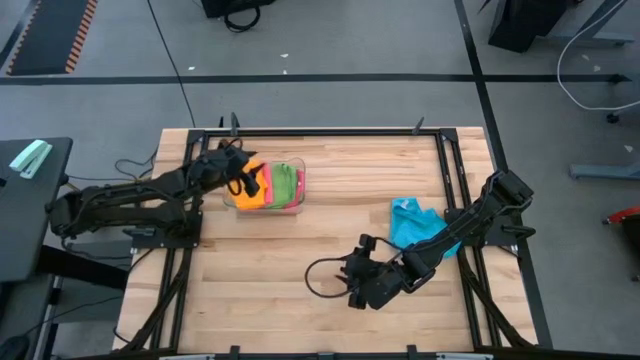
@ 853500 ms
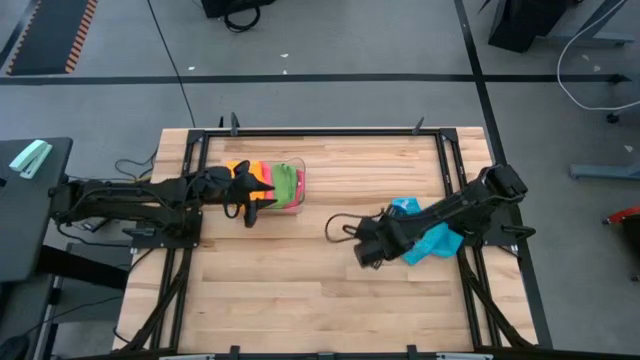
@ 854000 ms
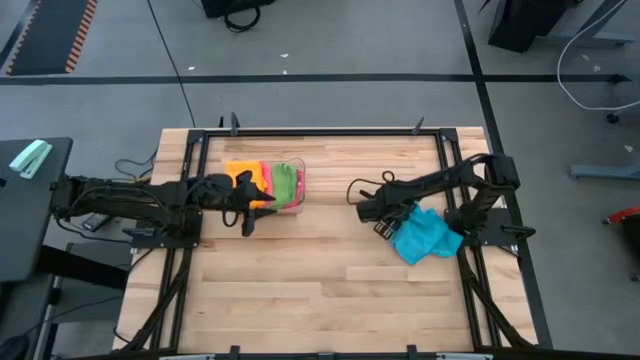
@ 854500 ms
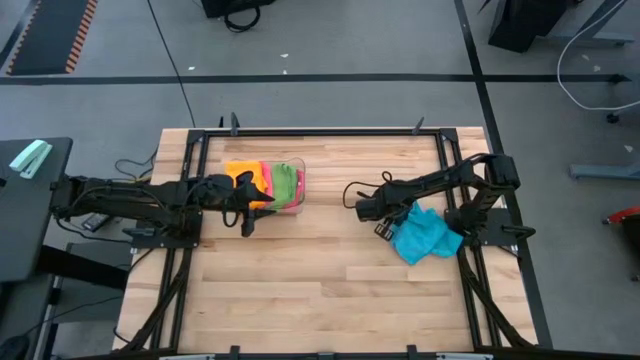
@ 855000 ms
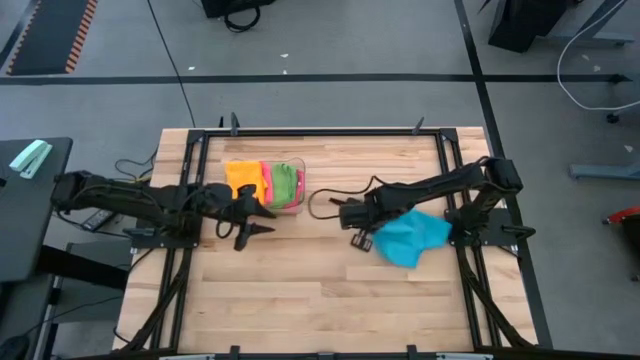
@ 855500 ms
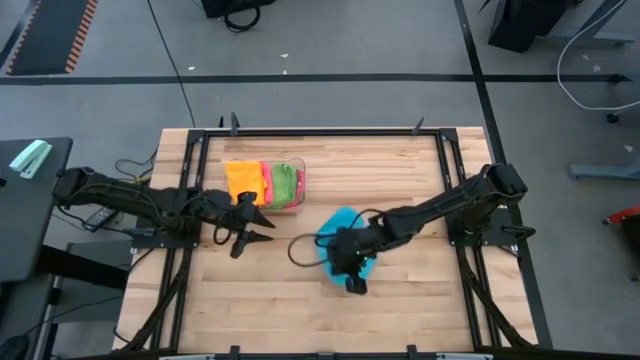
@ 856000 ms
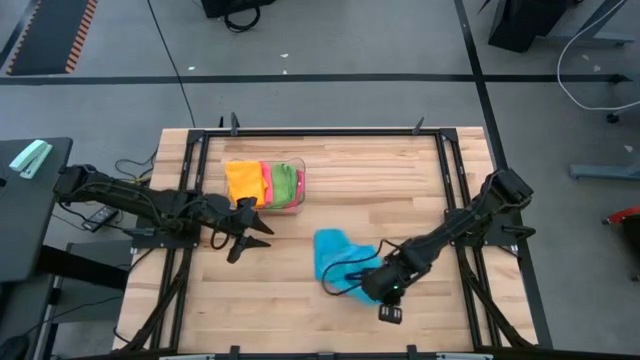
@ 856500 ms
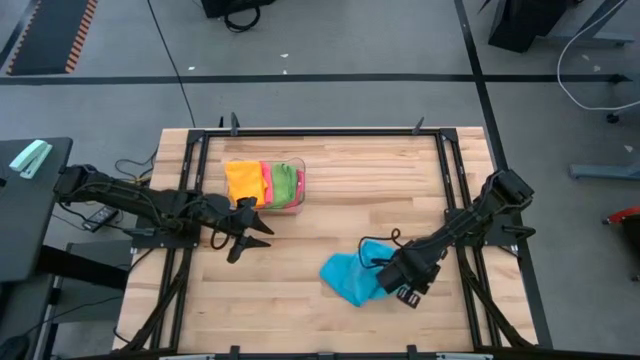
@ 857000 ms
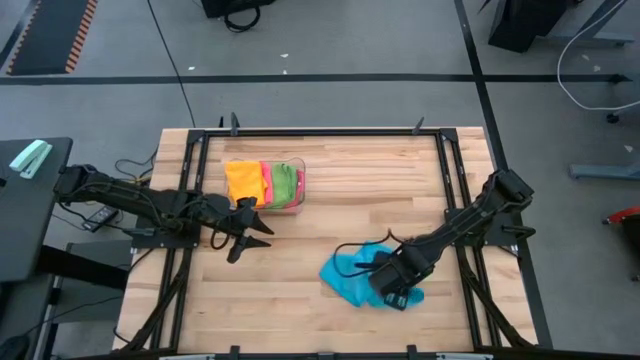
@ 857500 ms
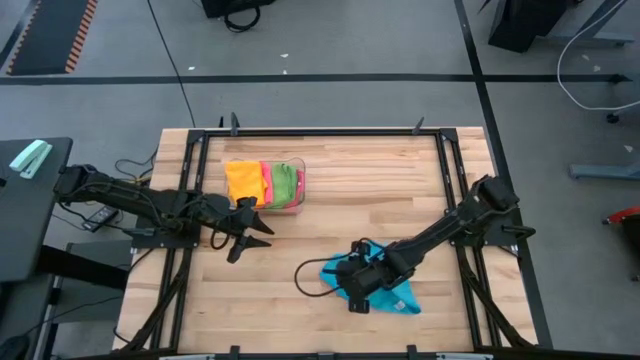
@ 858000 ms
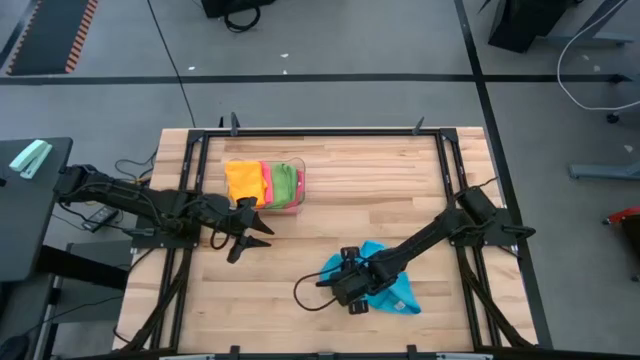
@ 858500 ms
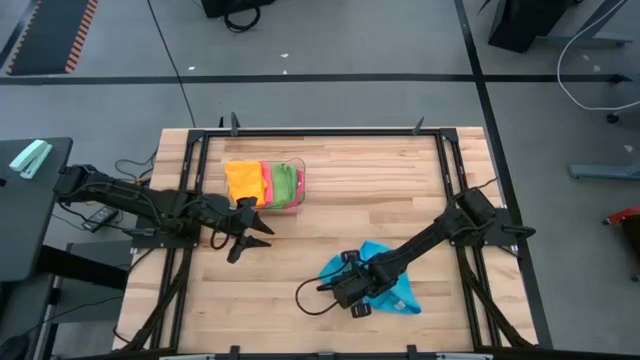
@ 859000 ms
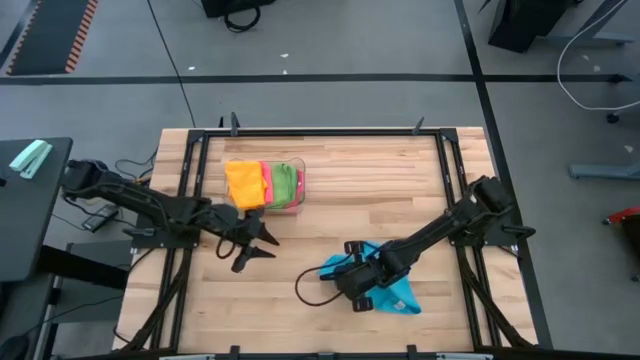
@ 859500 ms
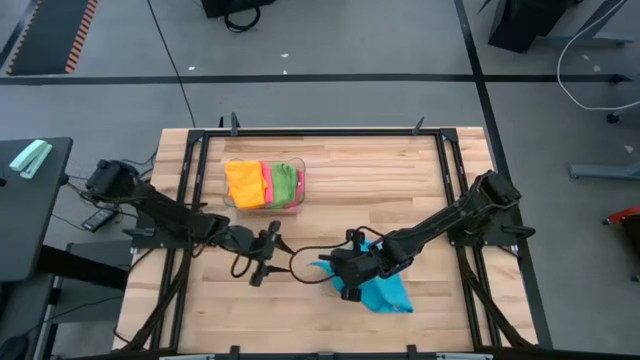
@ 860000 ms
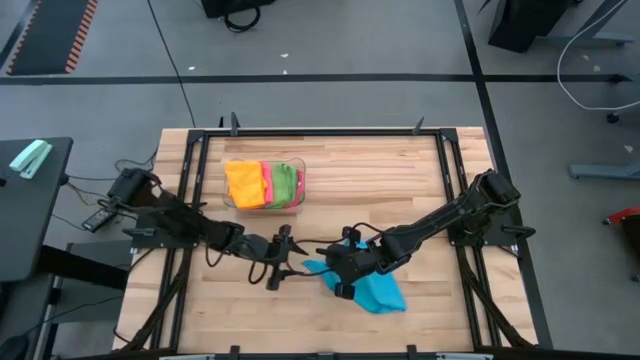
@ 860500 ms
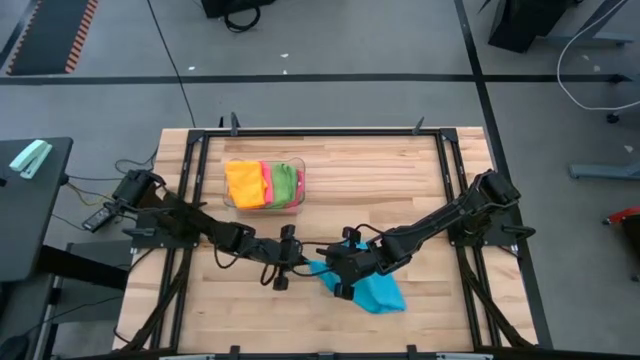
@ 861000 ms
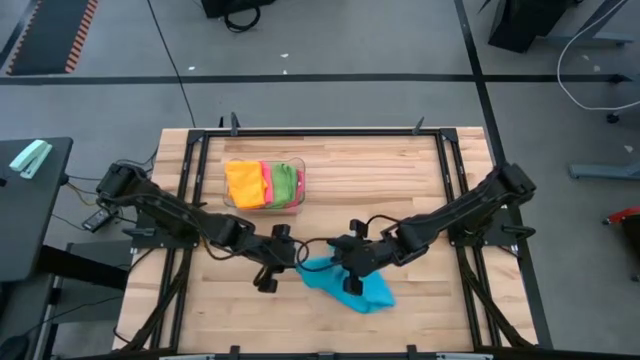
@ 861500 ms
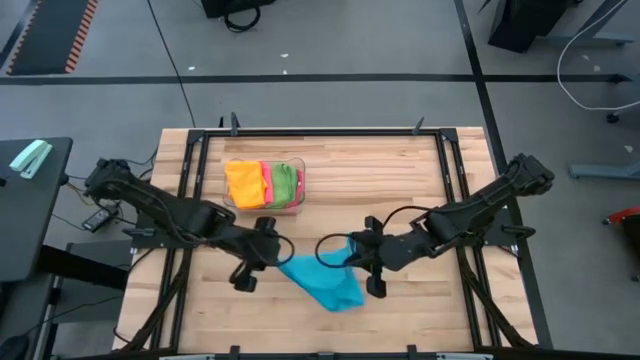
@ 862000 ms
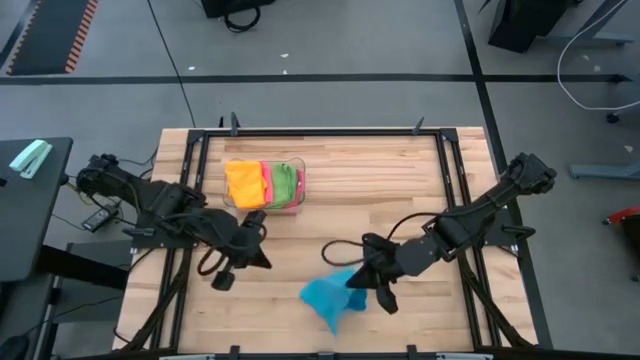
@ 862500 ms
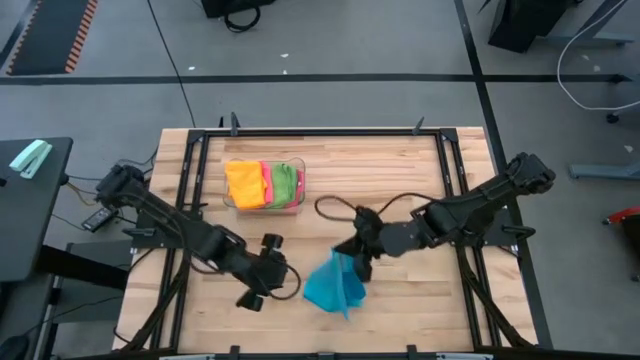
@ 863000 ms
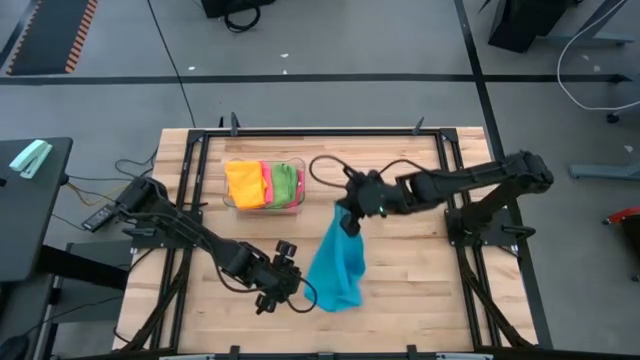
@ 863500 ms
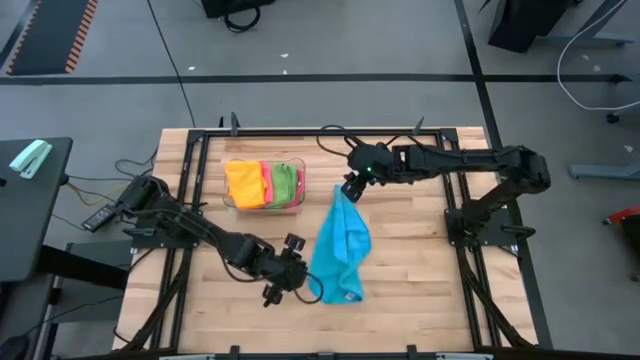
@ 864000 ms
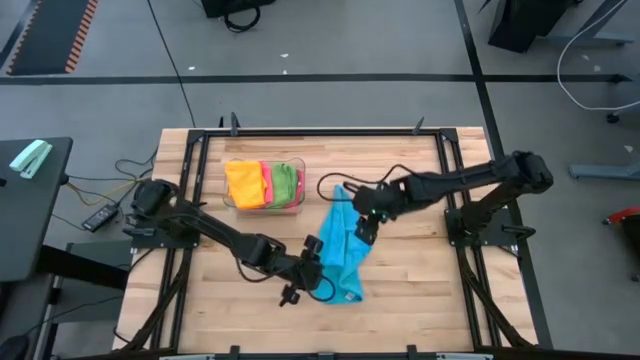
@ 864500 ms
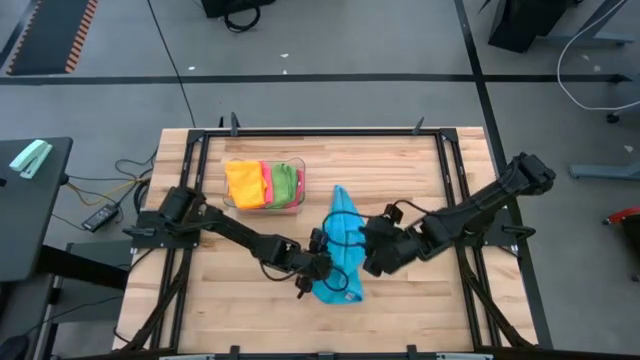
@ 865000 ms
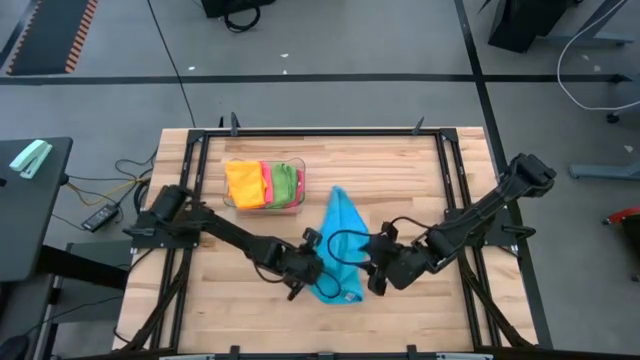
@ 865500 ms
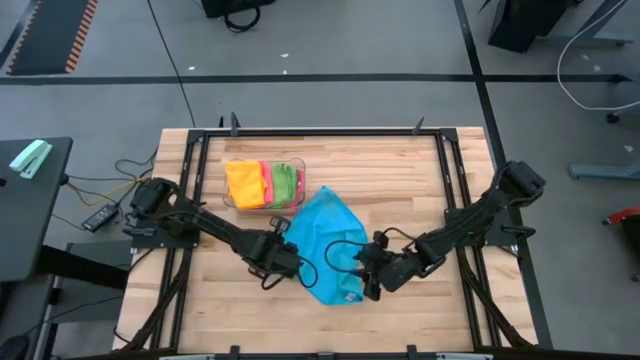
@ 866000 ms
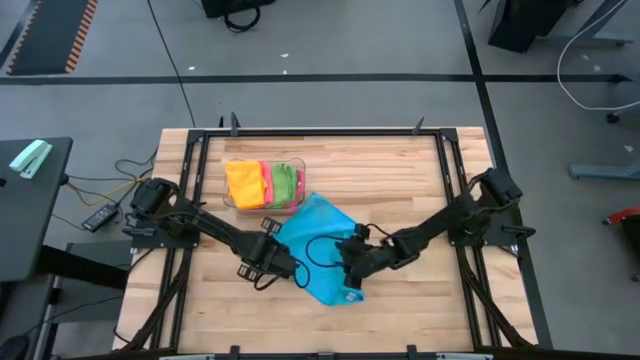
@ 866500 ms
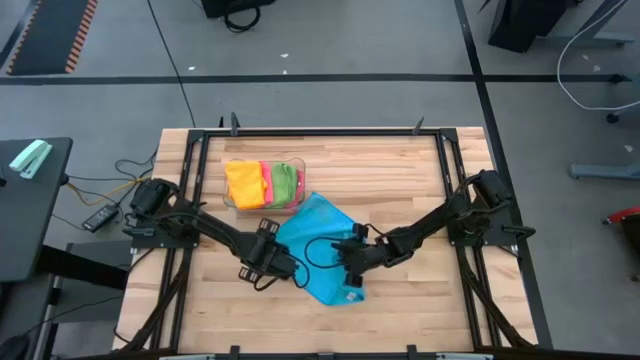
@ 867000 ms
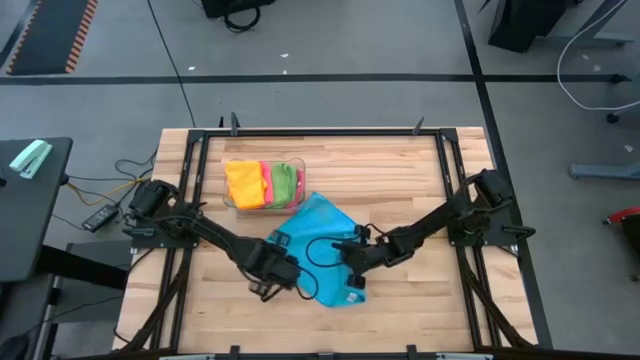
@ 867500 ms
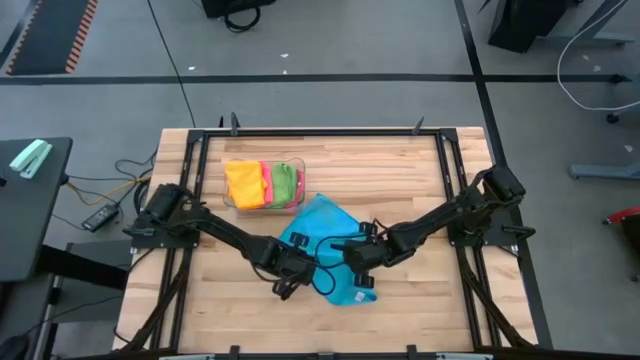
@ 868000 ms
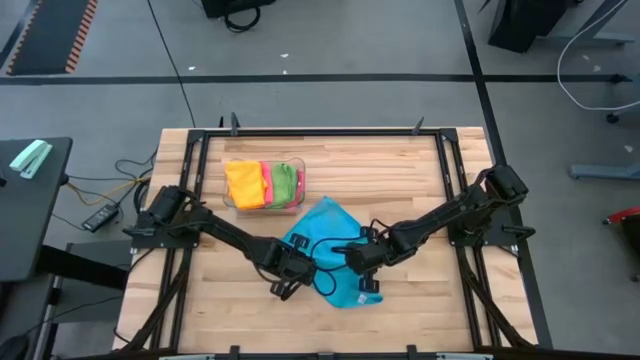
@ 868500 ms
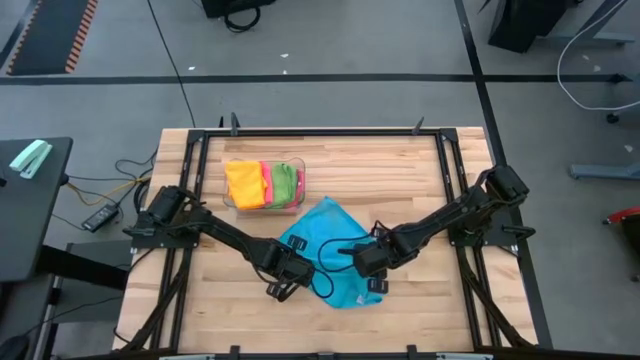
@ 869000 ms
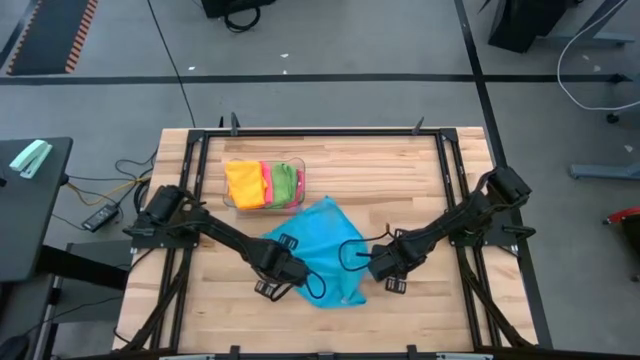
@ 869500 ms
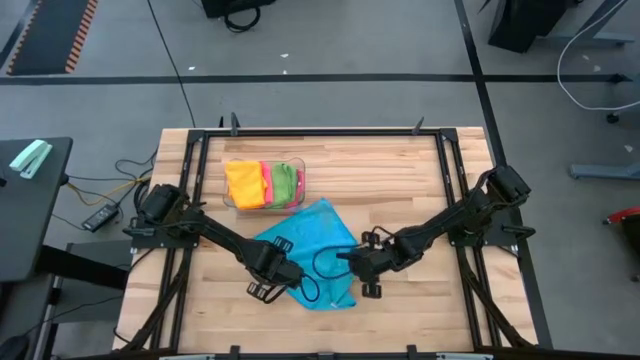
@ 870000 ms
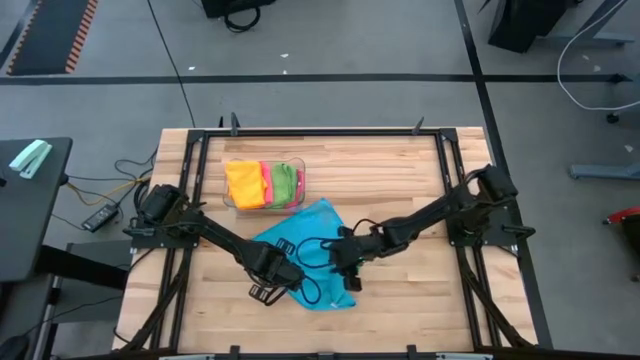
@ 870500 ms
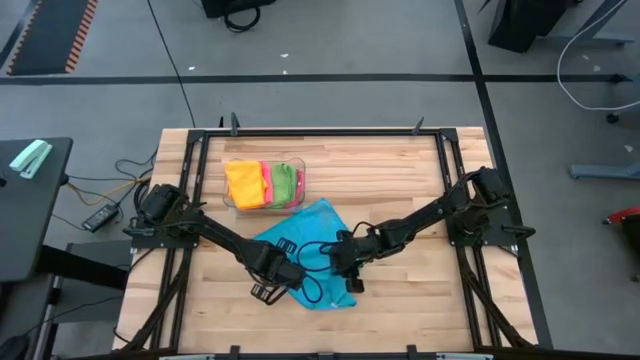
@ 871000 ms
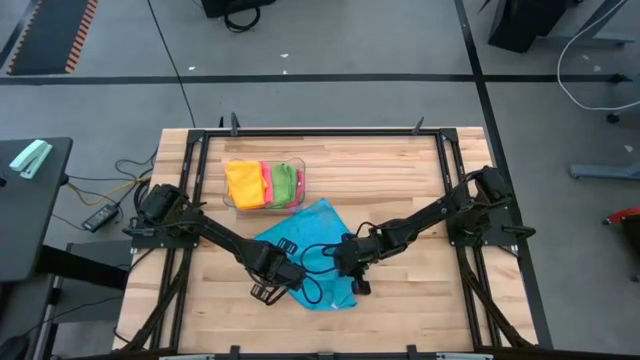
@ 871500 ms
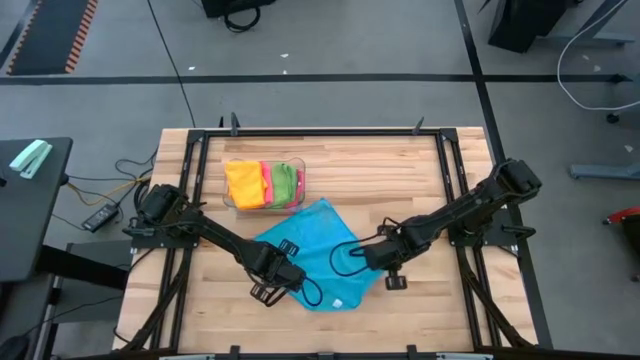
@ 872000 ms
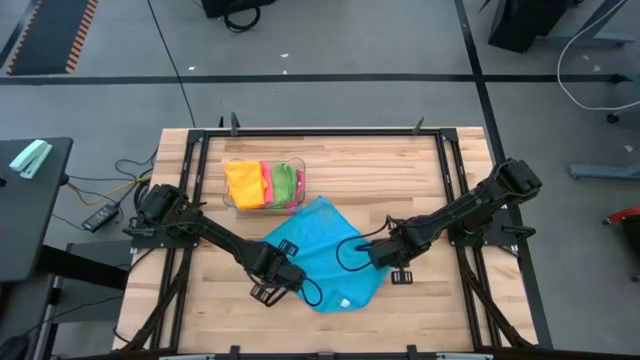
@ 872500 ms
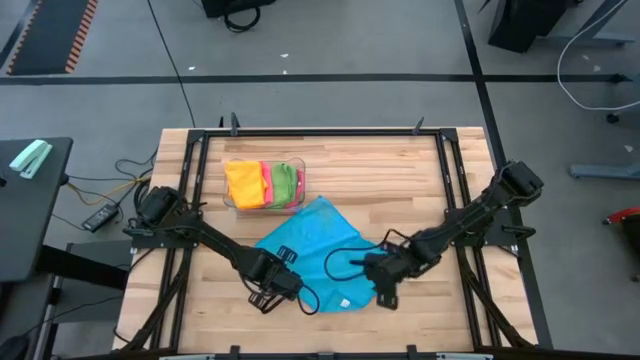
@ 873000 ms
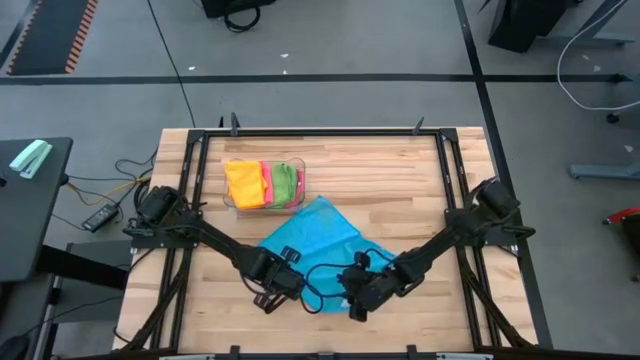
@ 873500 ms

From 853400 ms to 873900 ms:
Task: Fold microfiber towels
Fold the blue microfiber towel
